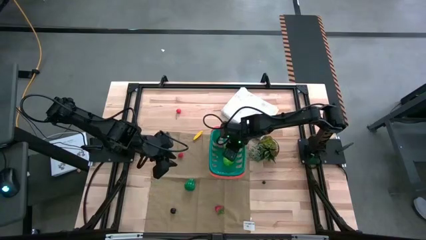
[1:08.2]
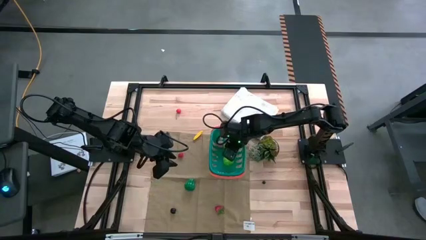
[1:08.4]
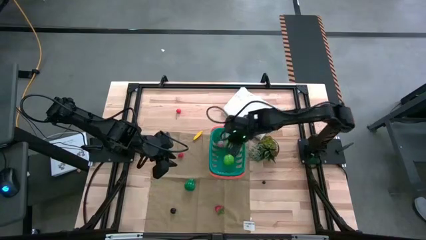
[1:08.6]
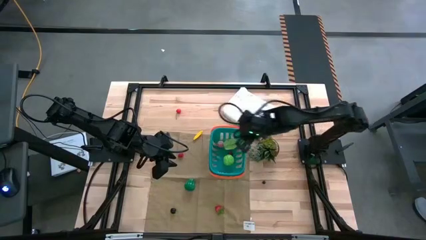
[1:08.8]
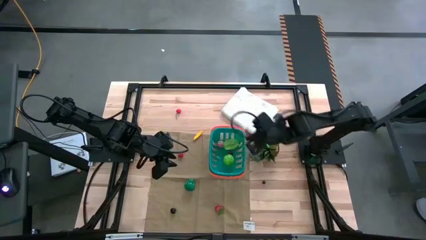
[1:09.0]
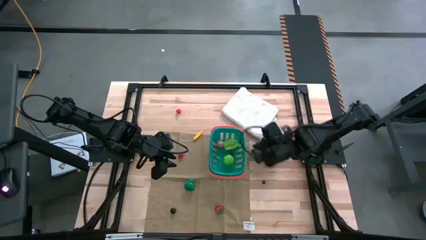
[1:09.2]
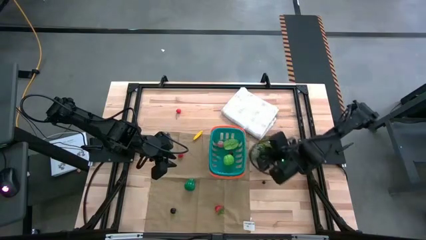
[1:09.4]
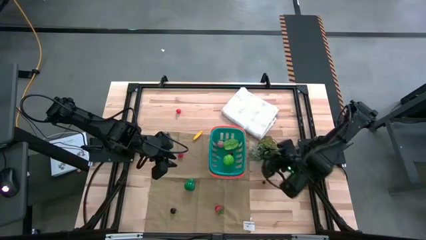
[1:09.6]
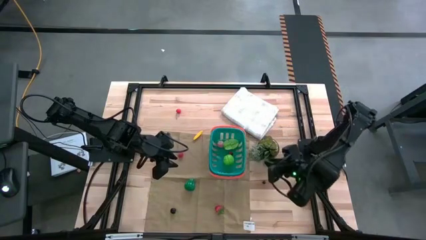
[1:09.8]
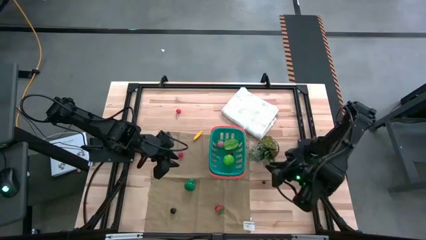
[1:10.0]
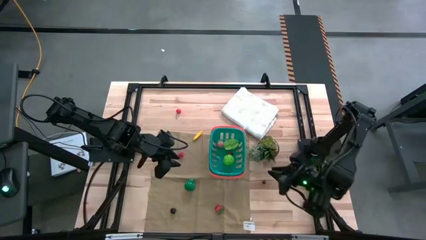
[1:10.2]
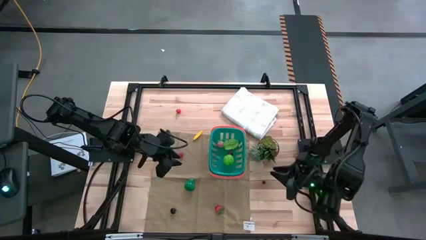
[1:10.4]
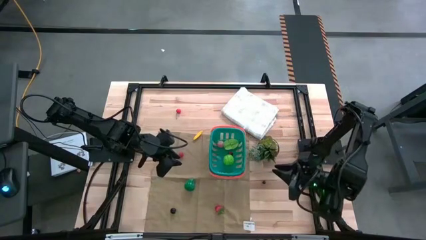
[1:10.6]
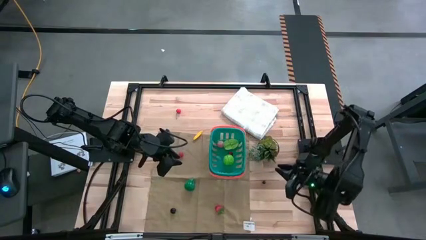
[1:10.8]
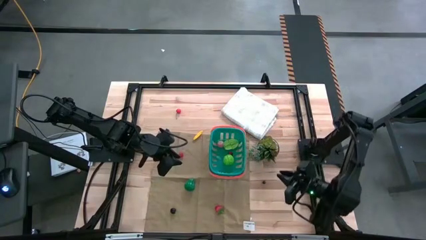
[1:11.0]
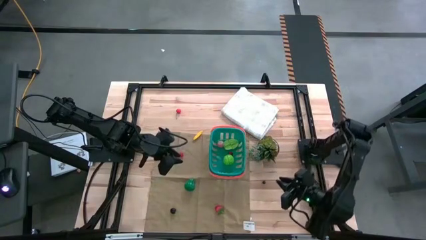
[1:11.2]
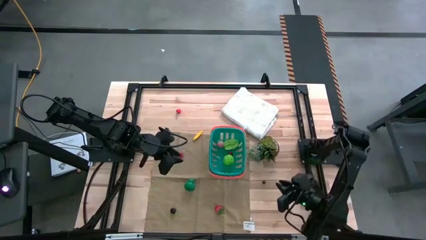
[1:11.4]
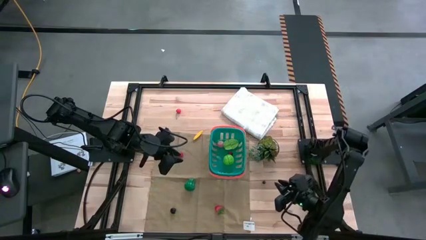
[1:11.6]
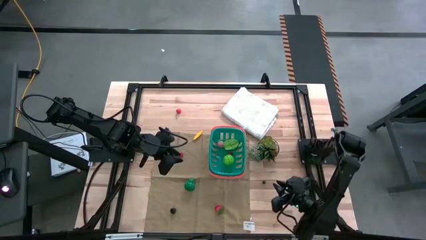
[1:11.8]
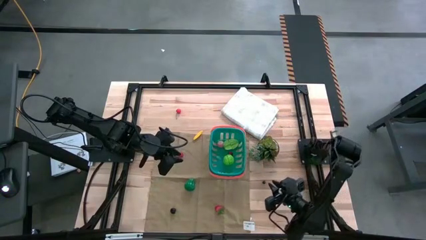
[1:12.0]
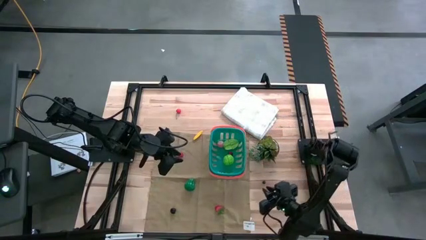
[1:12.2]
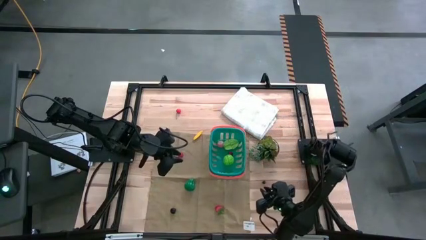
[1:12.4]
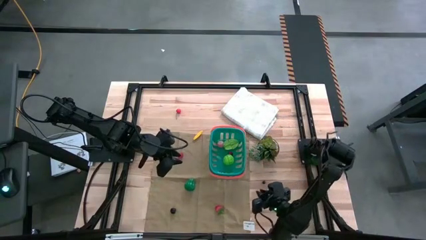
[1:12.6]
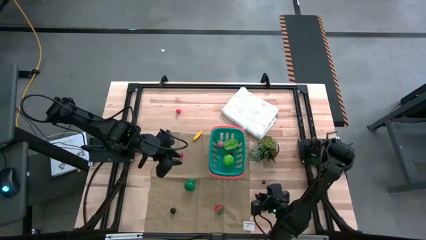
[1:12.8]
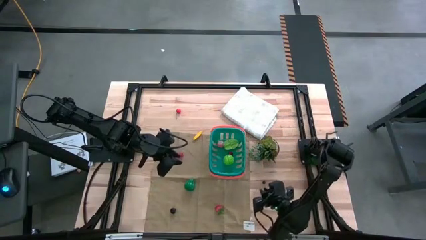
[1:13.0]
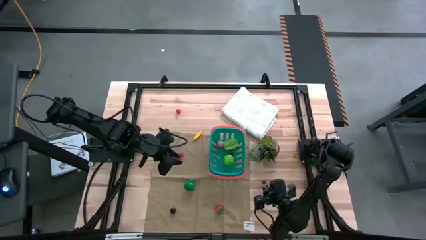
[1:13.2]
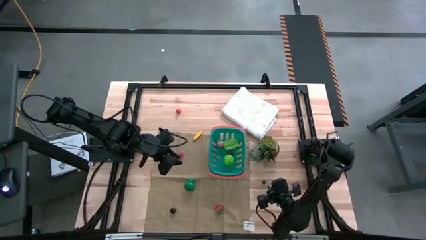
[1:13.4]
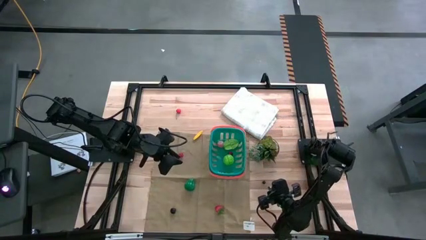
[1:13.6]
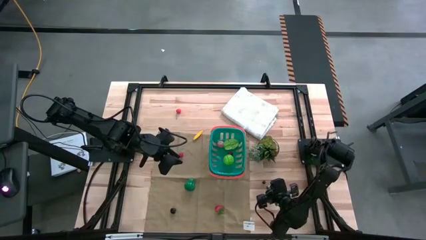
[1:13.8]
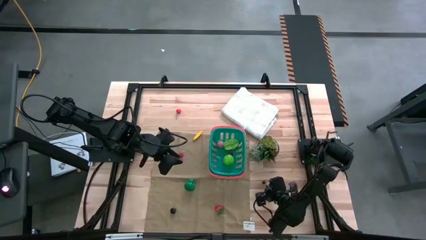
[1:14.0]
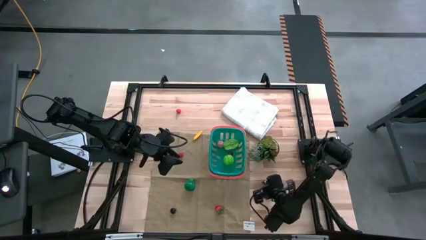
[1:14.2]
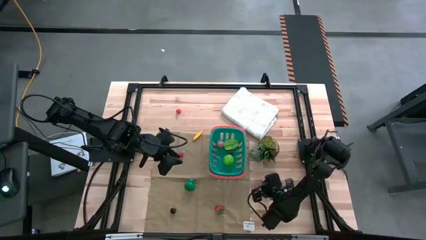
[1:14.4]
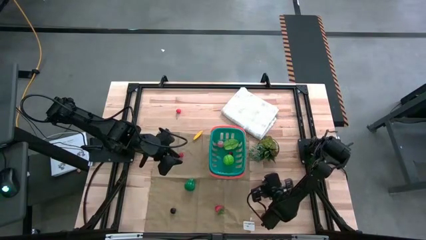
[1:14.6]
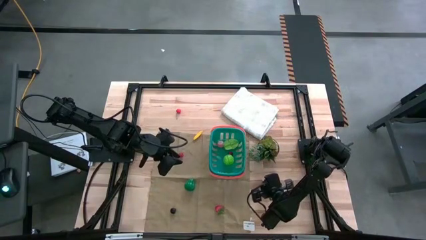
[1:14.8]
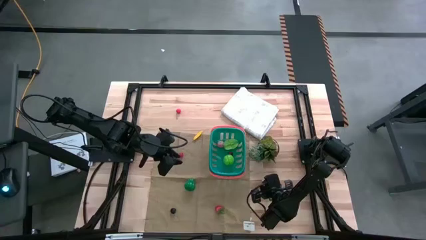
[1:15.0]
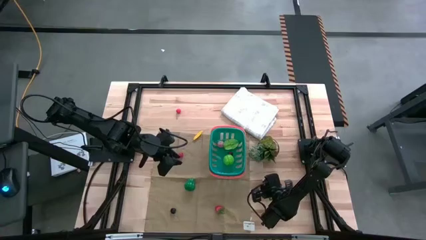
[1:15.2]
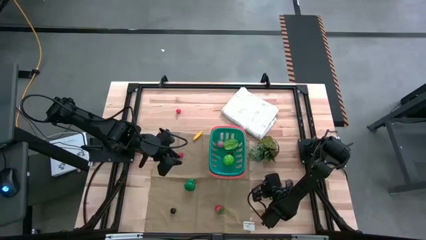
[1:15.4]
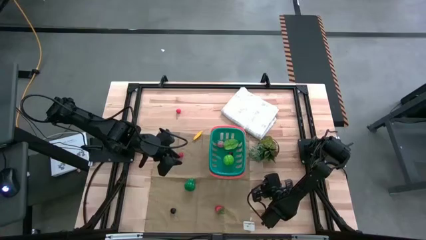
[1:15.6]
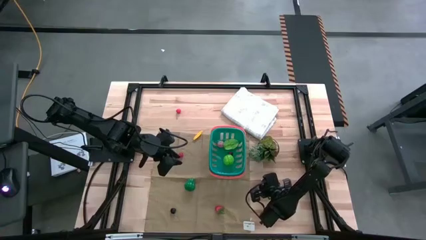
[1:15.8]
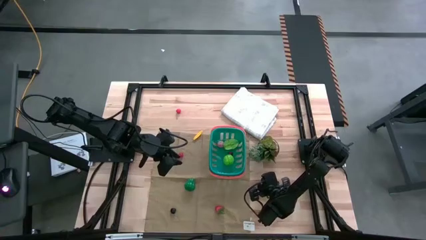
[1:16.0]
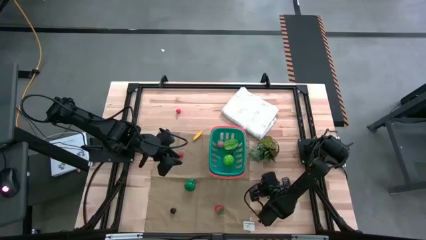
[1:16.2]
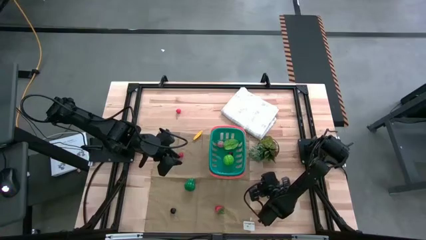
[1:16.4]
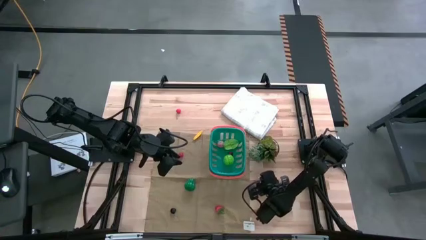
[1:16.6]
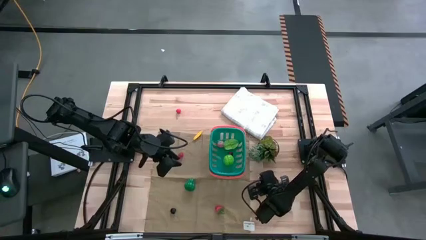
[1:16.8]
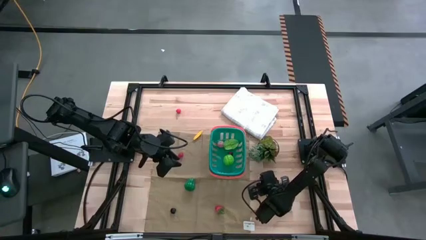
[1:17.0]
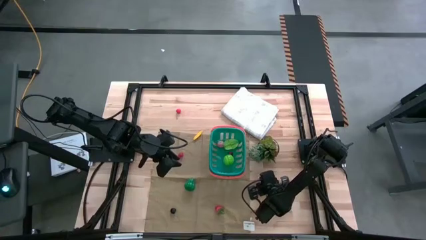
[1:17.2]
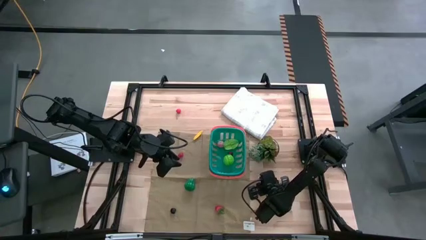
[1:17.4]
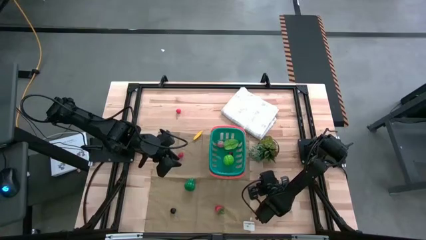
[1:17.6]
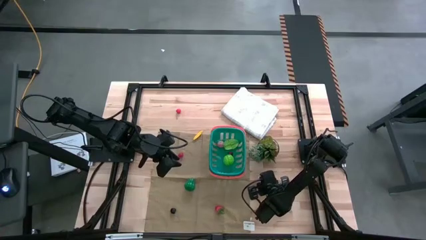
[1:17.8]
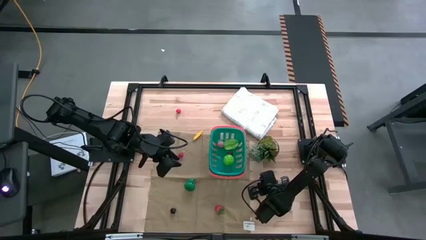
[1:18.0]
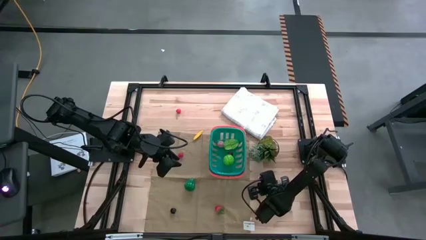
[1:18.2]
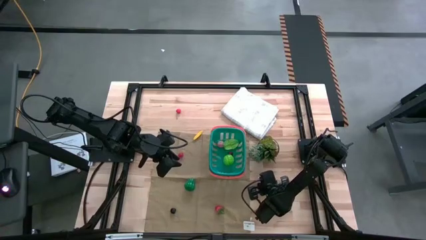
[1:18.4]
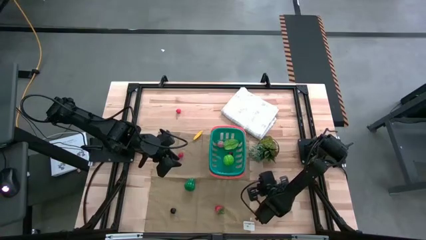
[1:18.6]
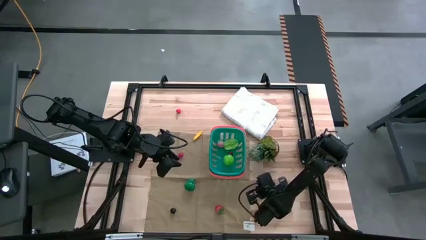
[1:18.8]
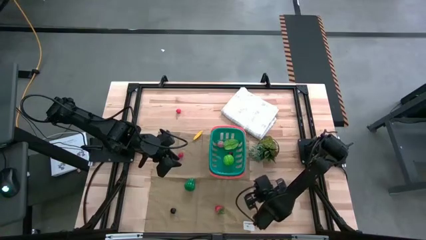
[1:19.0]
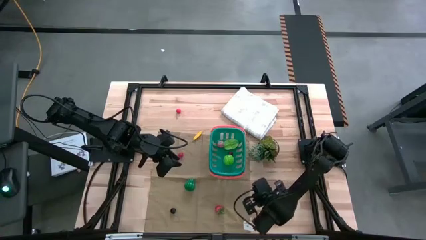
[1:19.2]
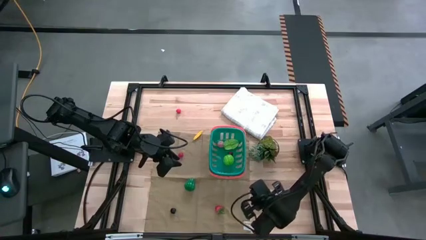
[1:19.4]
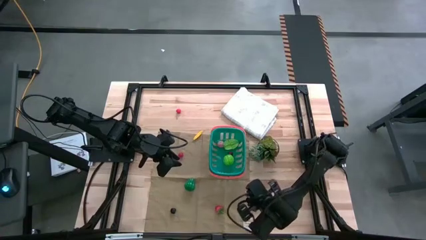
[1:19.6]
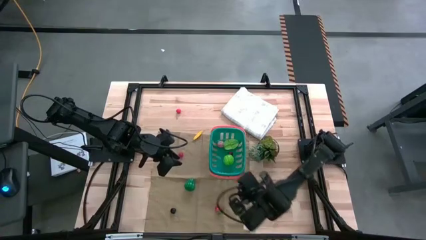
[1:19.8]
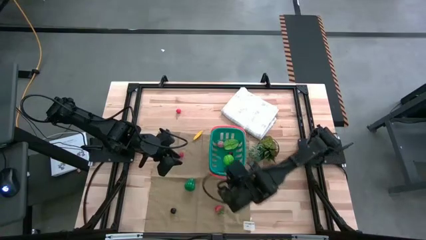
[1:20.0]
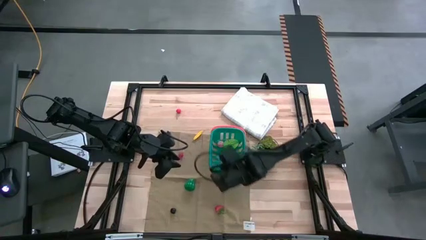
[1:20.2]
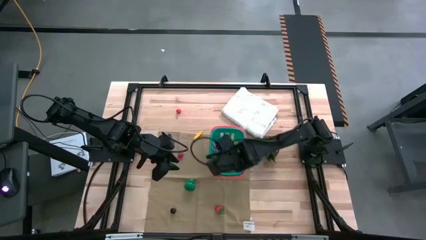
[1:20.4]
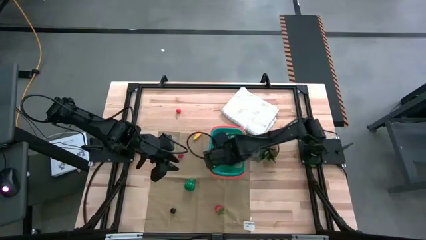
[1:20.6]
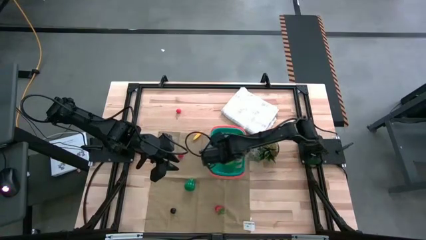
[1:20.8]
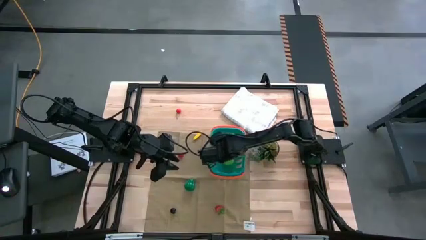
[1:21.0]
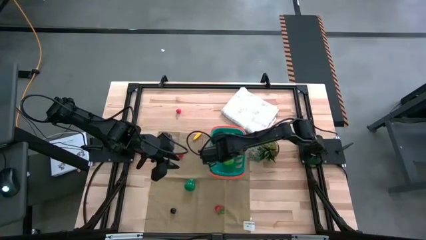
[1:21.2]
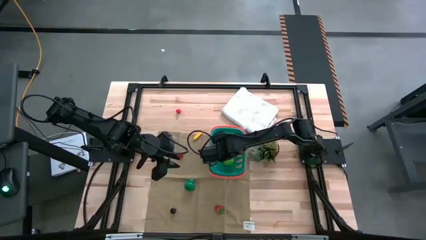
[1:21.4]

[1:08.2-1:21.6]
Task: Pick and placing Produce into tupperware
Put the blueberry into the blue basket
